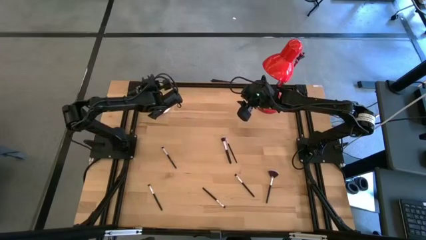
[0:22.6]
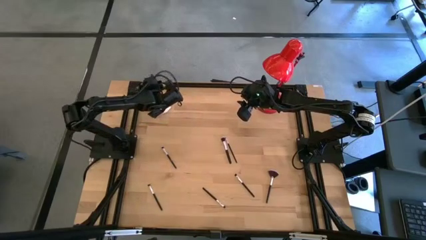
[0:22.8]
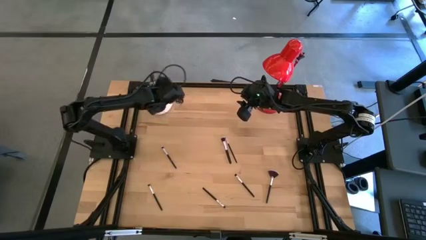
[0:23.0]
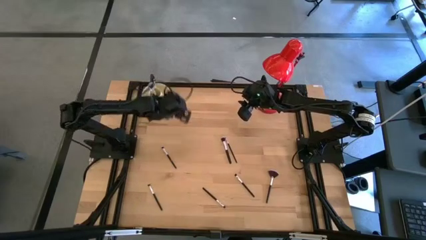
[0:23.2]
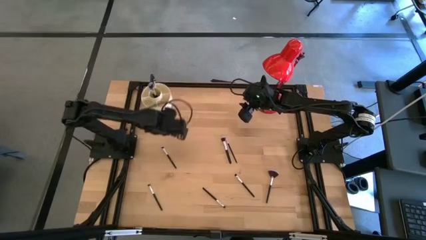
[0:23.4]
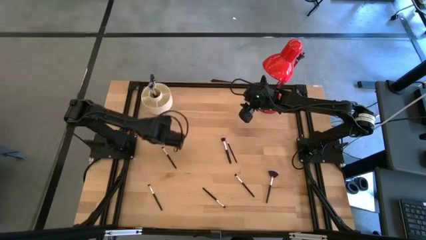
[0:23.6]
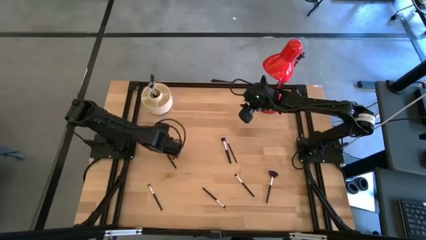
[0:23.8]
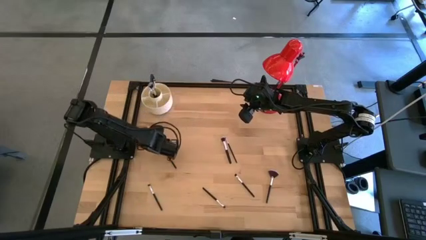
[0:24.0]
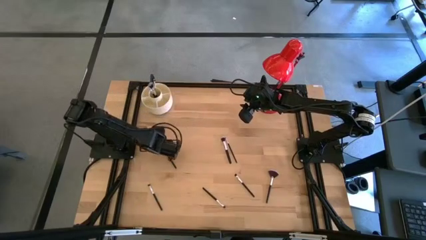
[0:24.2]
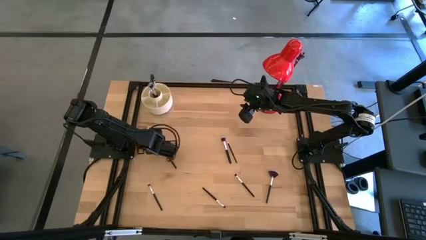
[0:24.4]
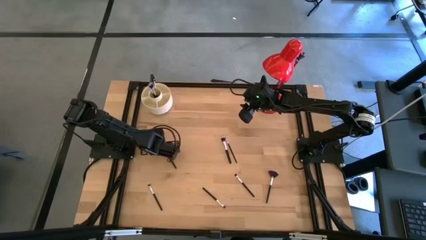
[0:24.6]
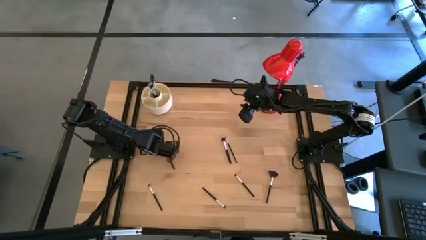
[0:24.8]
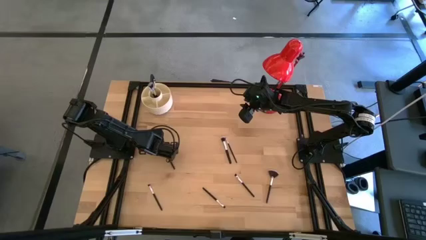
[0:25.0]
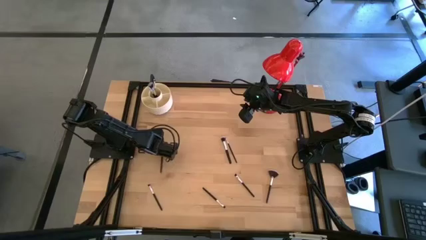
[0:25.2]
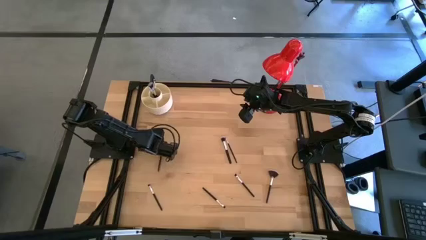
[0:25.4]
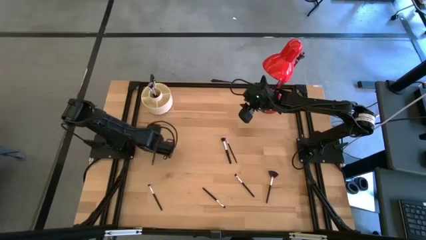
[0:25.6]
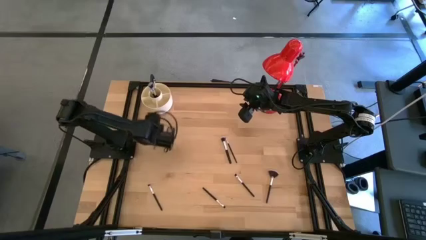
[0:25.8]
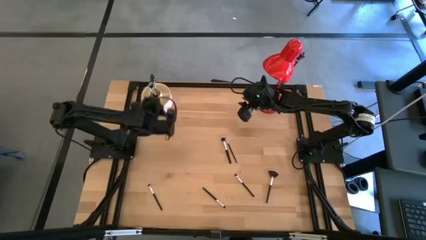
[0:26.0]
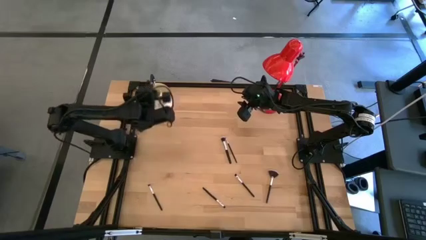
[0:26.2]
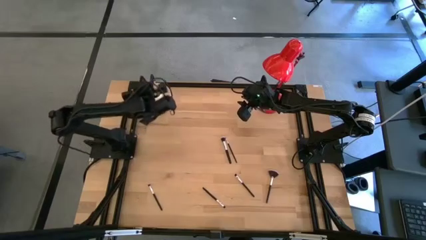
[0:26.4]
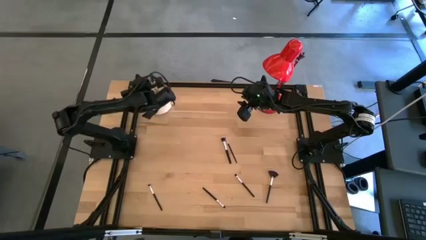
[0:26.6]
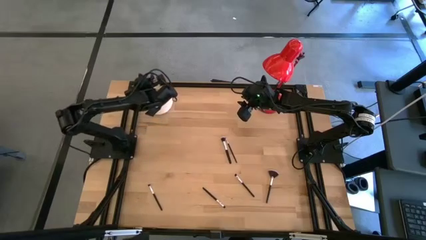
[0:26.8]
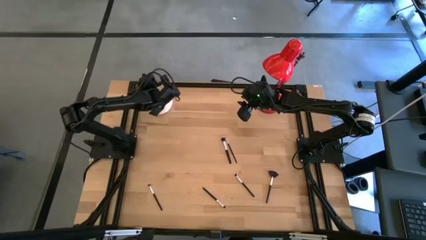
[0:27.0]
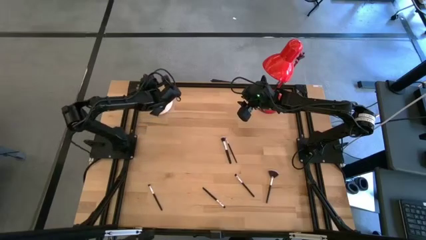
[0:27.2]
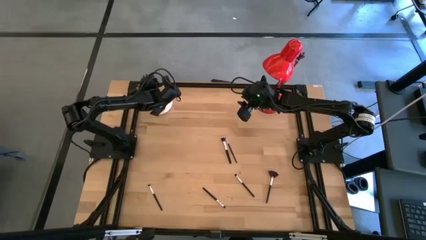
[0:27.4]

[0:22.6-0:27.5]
Task: Put items in baskets/containers
Put the eyeshadow brush into the organizer

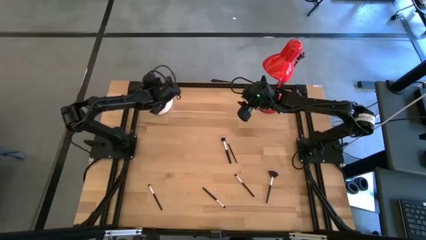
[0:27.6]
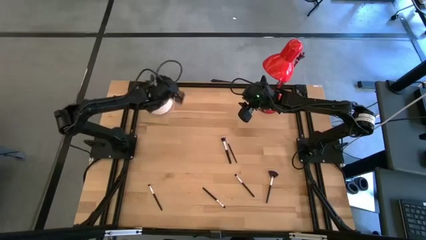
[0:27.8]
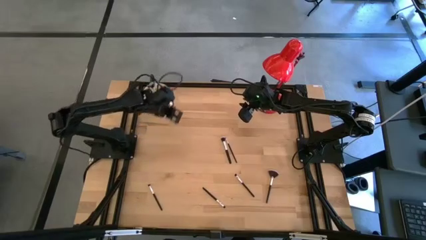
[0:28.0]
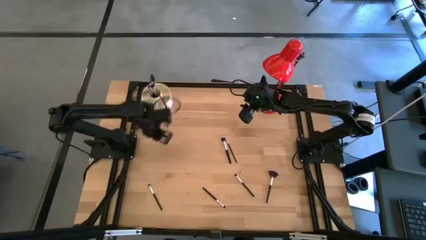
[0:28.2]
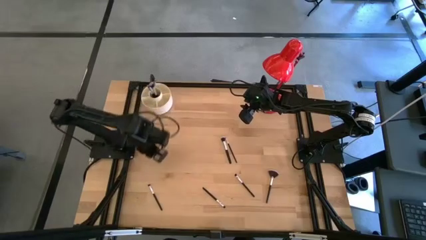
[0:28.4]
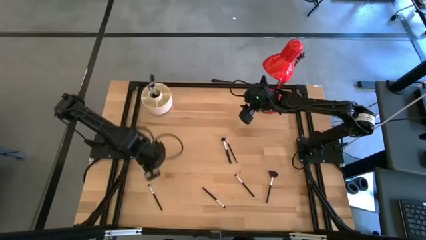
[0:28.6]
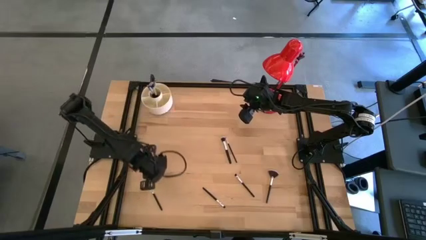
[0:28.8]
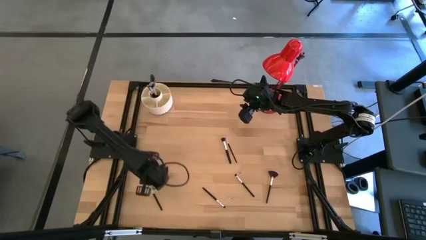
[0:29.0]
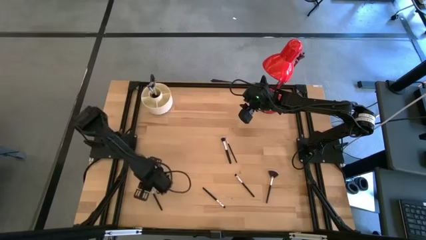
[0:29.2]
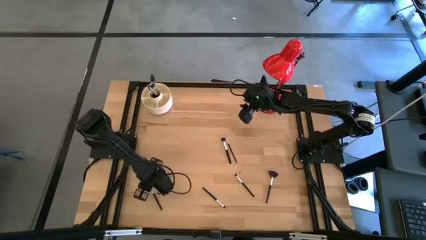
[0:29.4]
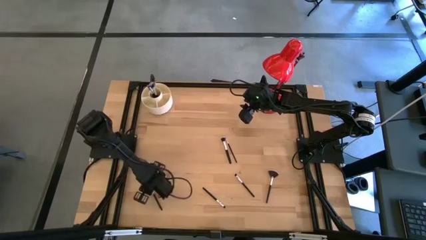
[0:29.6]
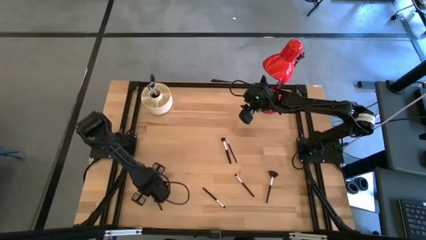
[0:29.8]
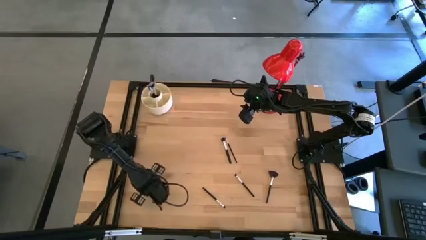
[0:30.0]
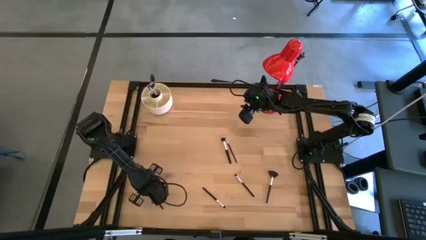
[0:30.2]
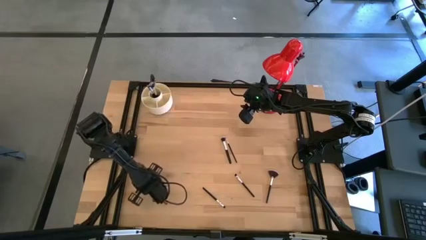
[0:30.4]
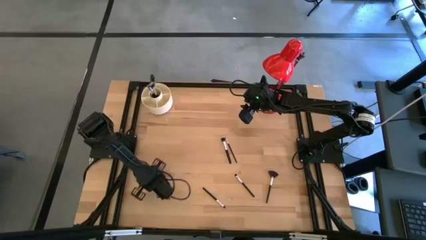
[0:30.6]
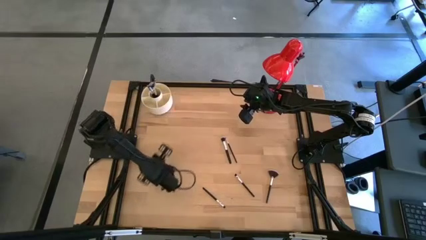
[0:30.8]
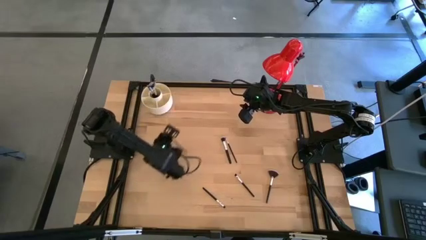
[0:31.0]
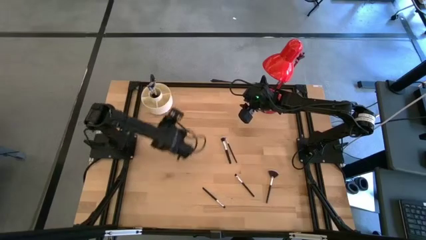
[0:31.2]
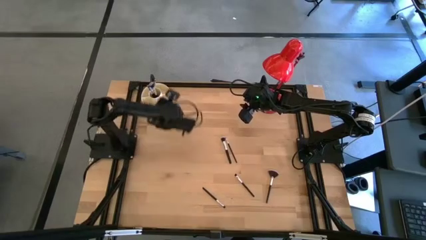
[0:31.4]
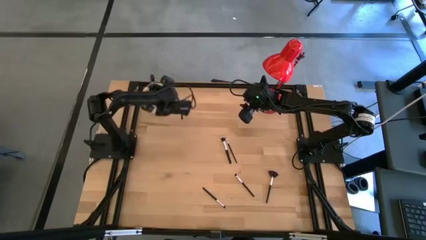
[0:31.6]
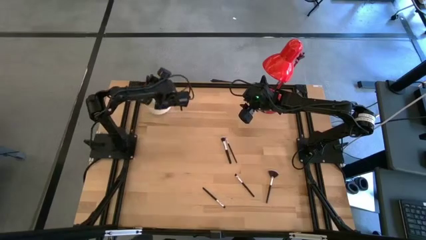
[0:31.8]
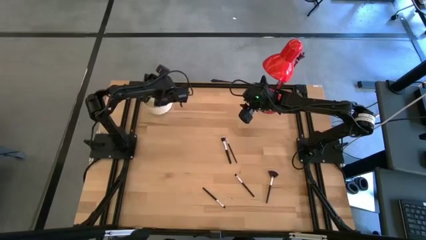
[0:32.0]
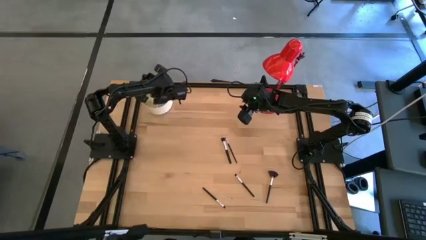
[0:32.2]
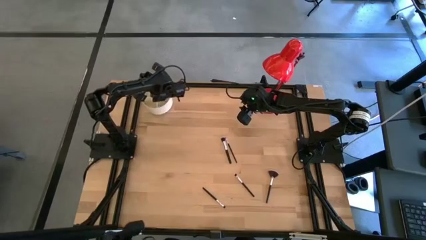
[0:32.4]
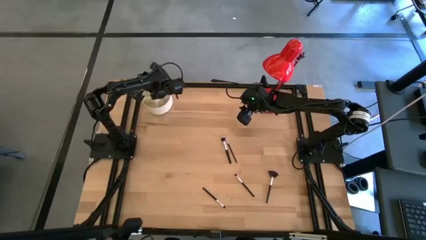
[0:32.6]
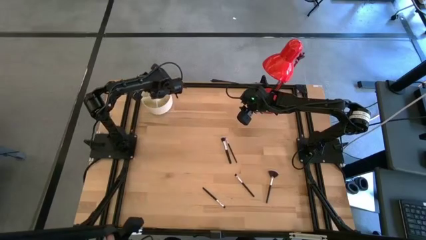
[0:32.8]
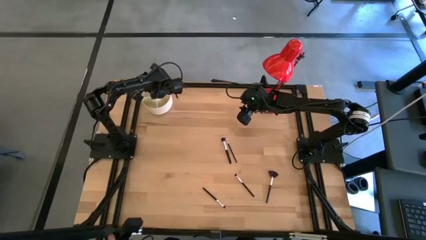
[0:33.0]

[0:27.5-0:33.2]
Put the eyeshadow brush into the organizer

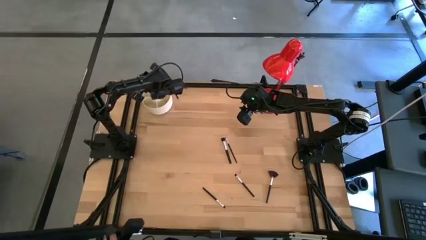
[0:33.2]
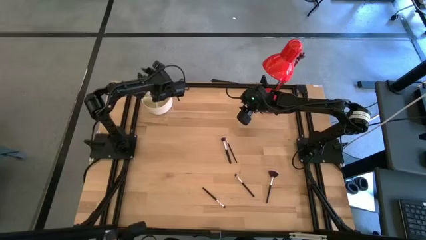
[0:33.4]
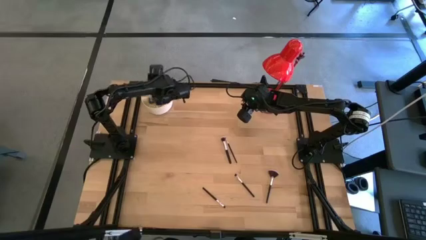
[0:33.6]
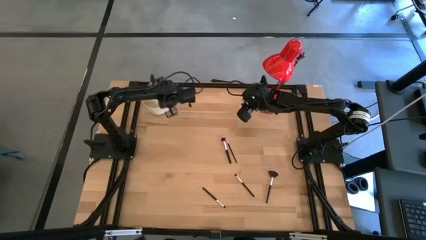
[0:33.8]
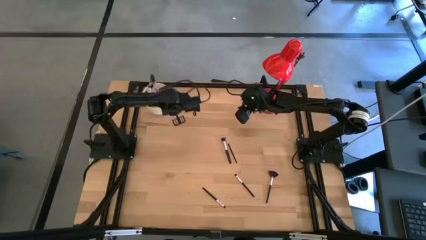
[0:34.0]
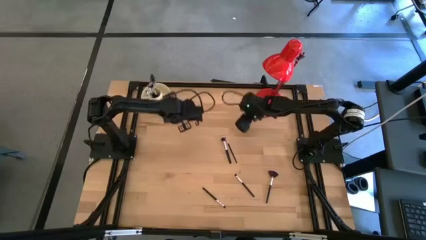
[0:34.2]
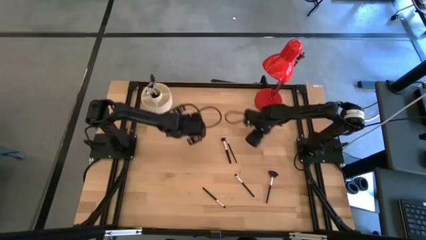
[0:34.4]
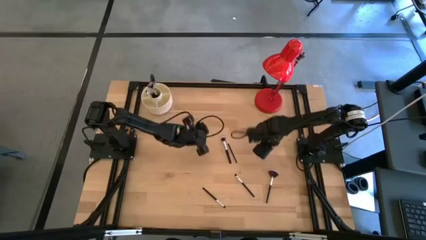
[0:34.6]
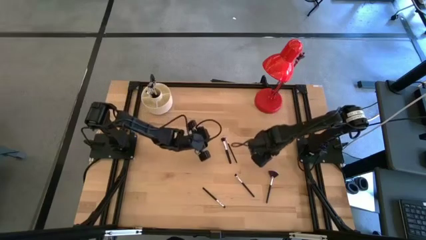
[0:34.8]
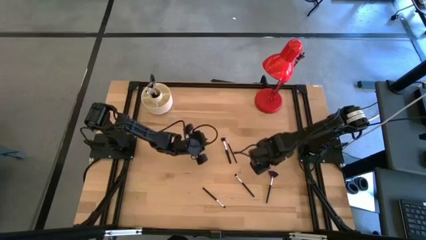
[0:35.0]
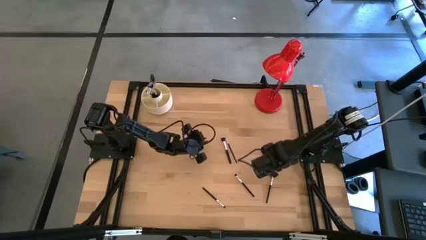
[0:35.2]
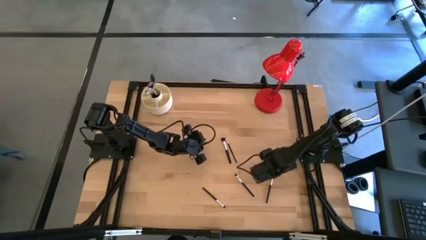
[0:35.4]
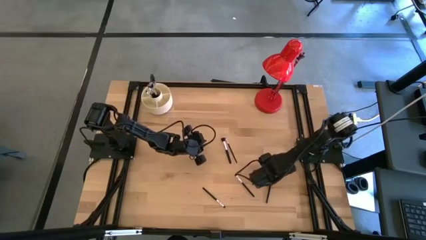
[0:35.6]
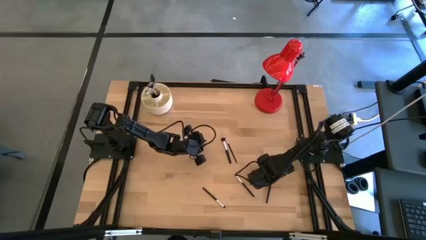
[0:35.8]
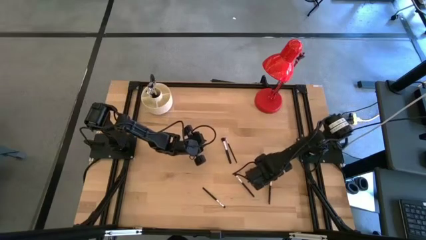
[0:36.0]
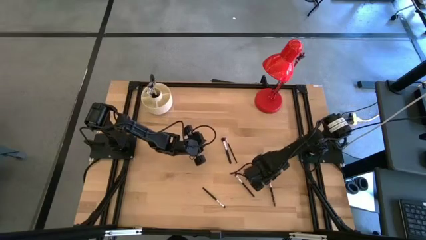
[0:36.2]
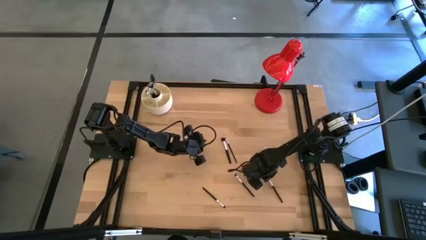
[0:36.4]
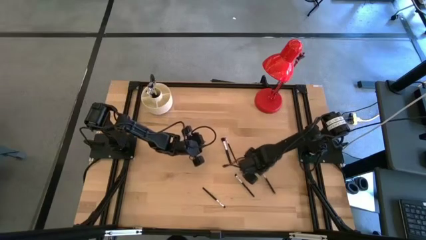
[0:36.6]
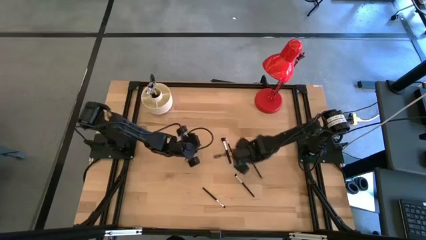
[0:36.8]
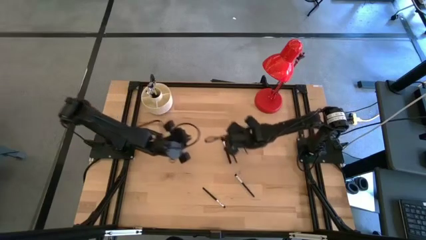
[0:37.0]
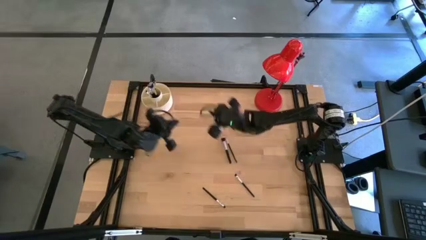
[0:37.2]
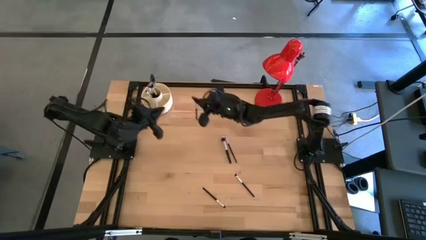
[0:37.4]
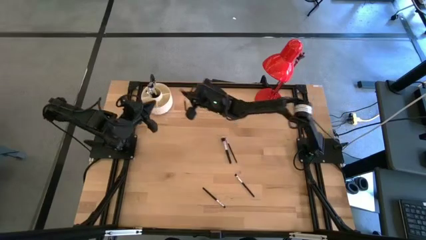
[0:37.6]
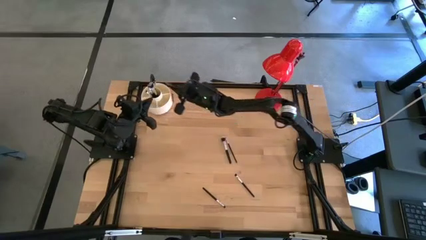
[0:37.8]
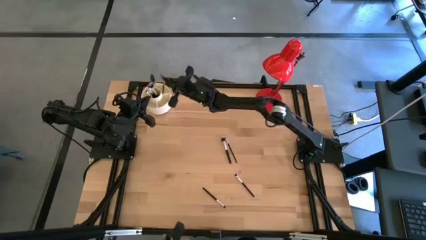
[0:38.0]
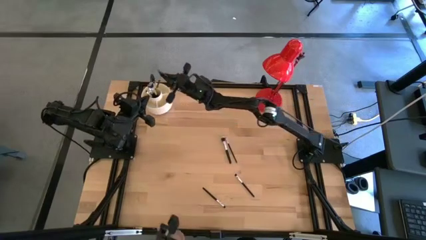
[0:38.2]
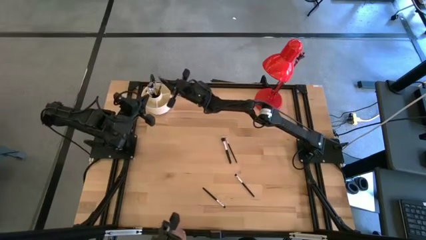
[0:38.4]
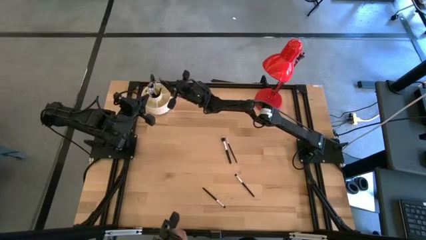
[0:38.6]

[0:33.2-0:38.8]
Put the highlighter brush into the organizer

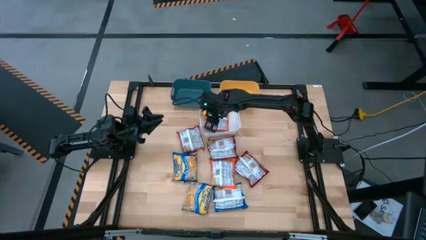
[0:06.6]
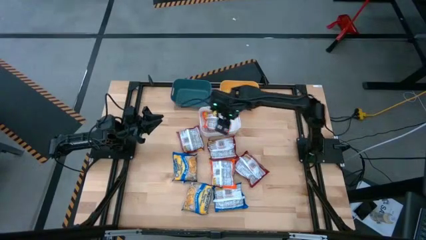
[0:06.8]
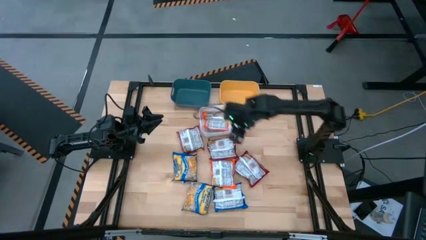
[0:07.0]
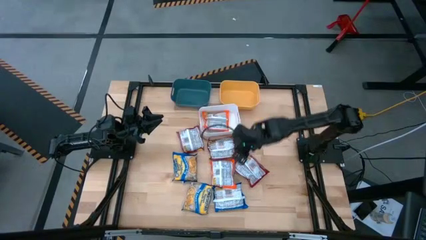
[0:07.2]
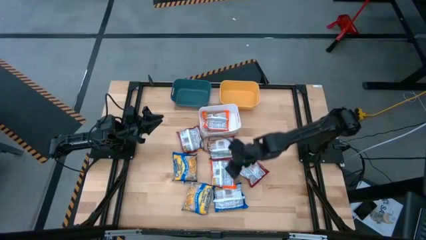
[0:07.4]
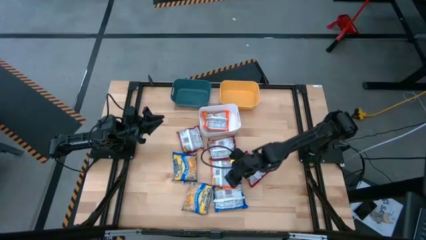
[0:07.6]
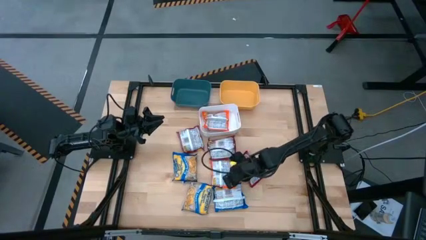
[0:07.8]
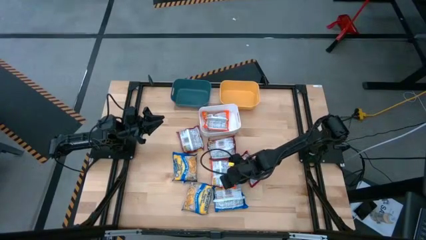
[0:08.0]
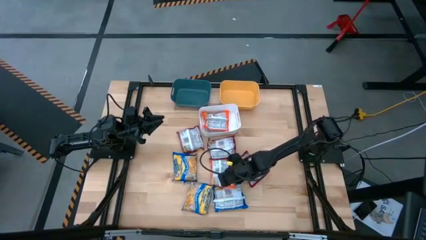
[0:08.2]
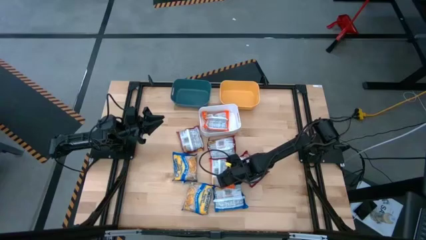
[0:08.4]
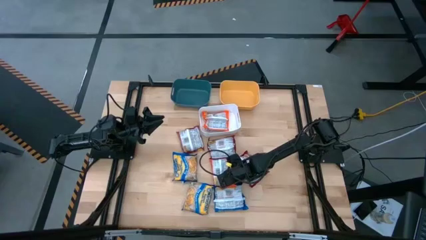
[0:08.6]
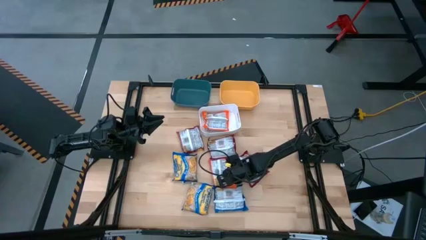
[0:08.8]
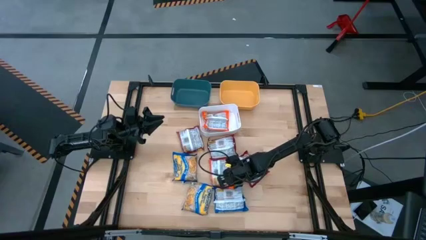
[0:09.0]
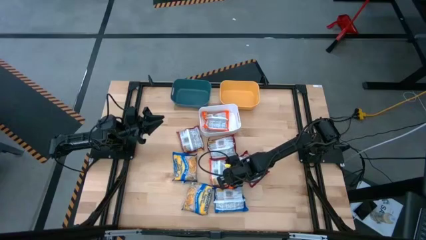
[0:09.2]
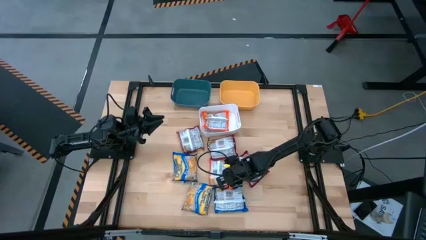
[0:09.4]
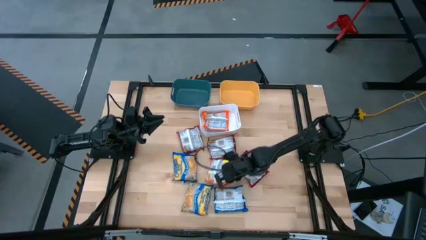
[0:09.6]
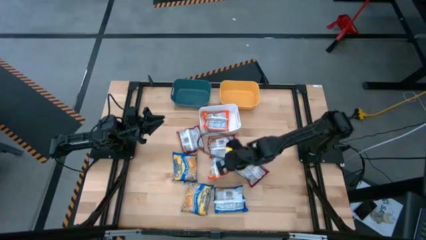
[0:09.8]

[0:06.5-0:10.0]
Task: Sort Maruchan noodles
Put the orange noodle pack into the white bin
